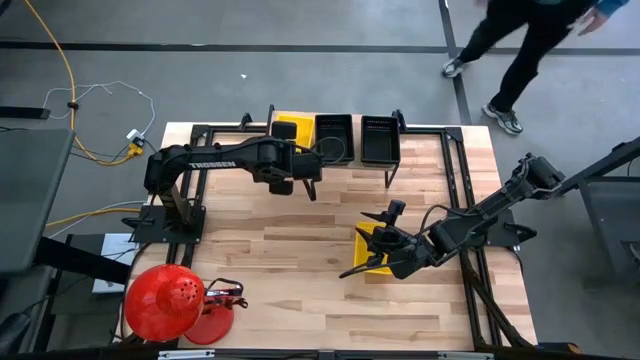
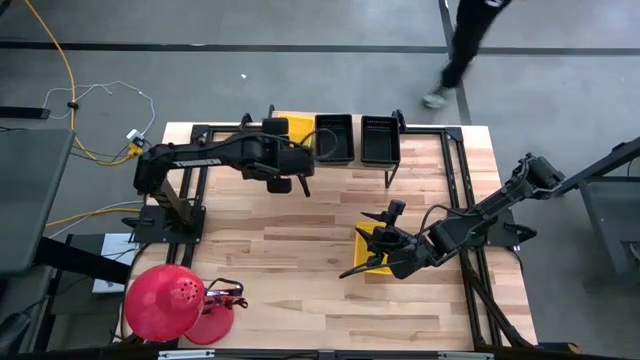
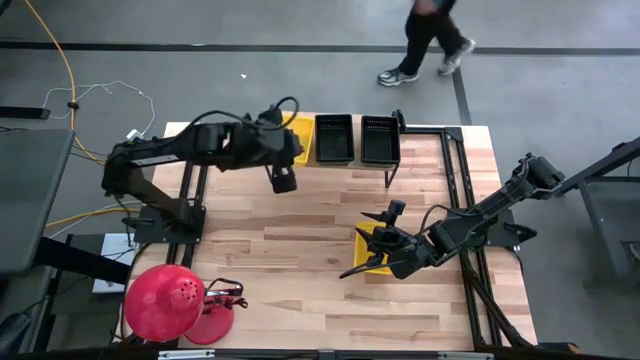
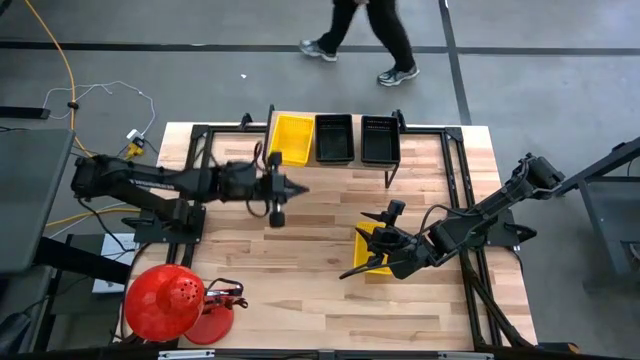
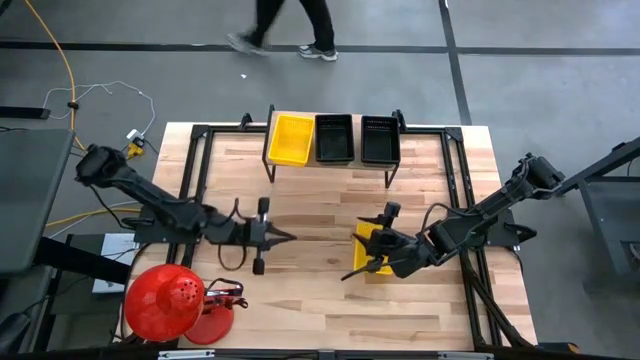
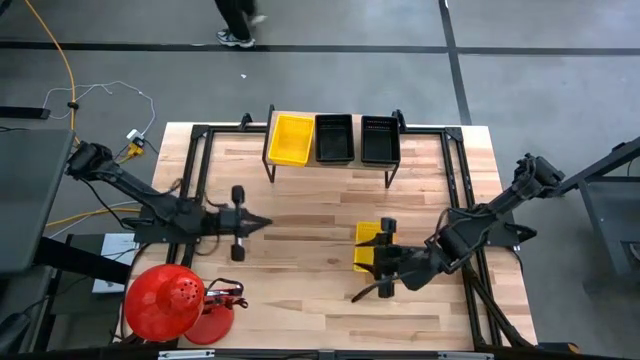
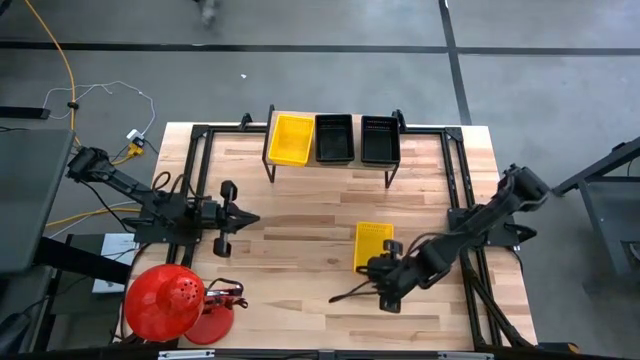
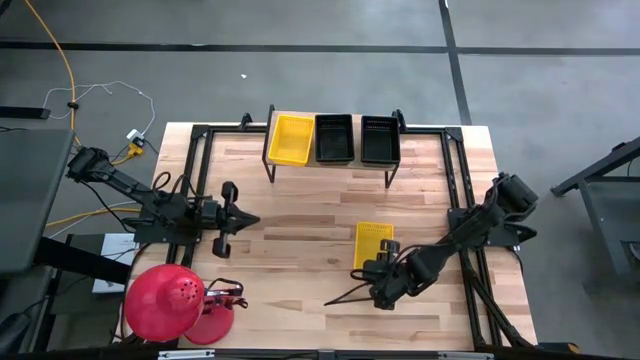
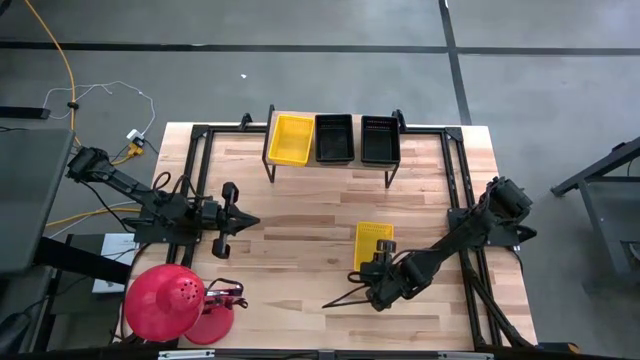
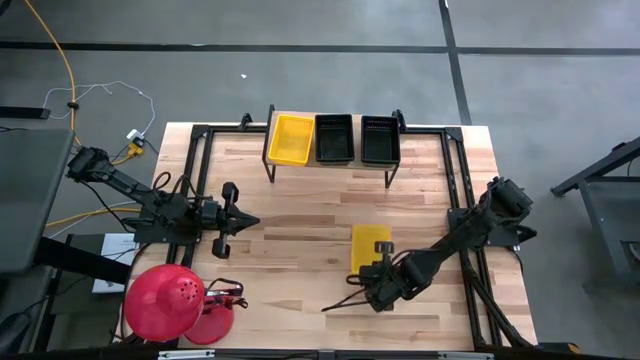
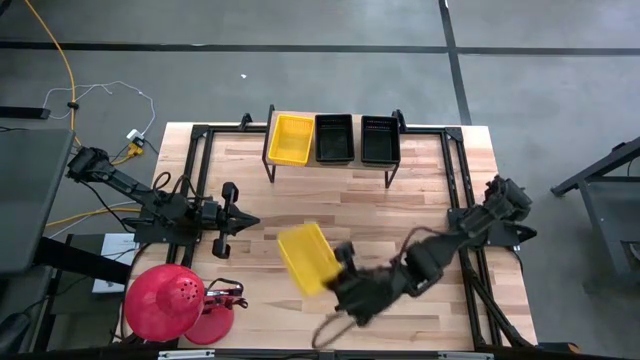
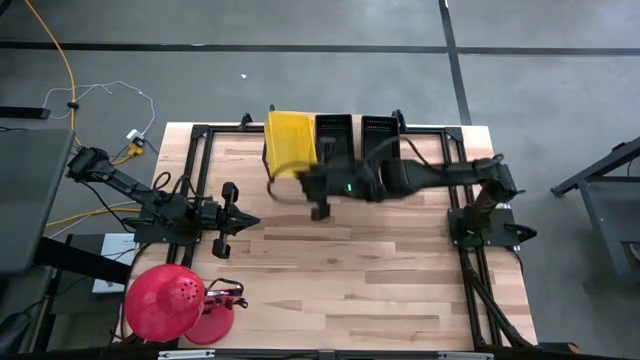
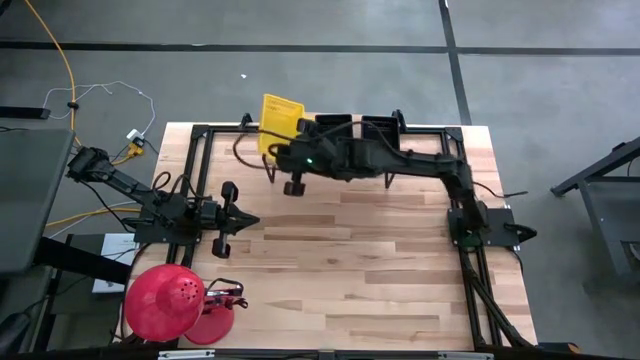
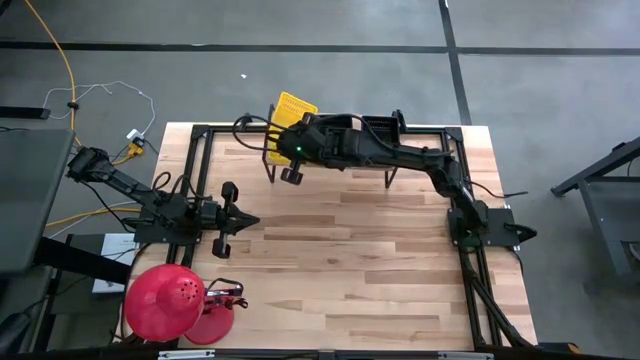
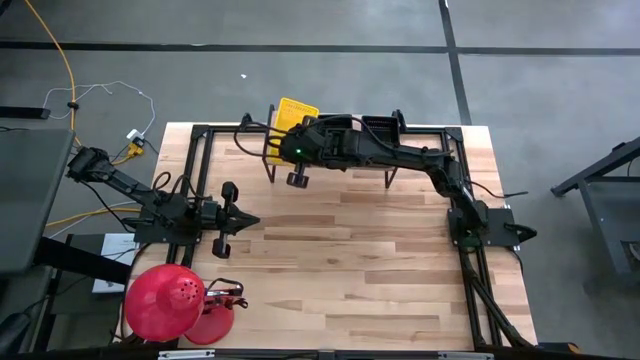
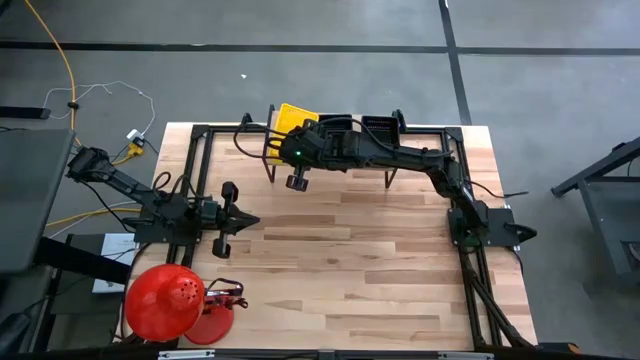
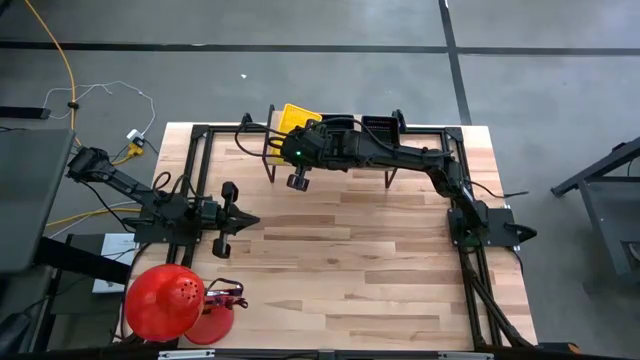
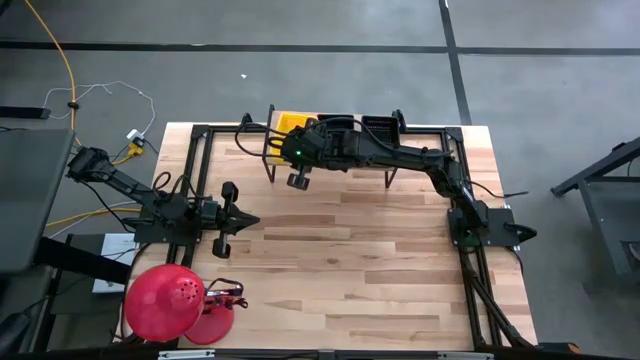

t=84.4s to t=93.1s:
Task: Stack baskets on shelf by color
Stack the yellow bin on the yellow bin on the shelf

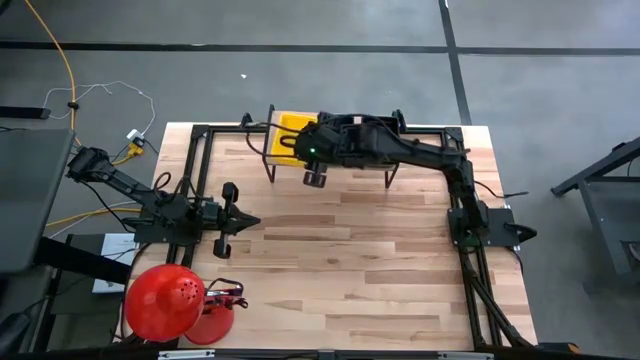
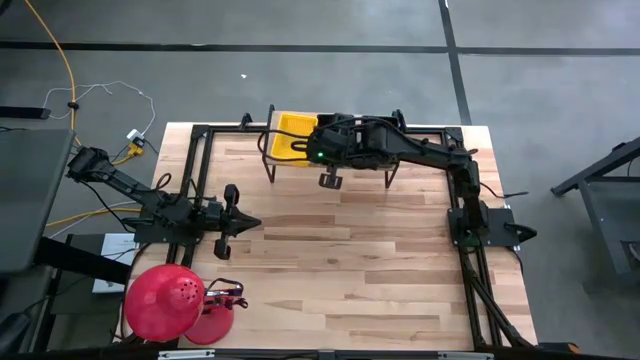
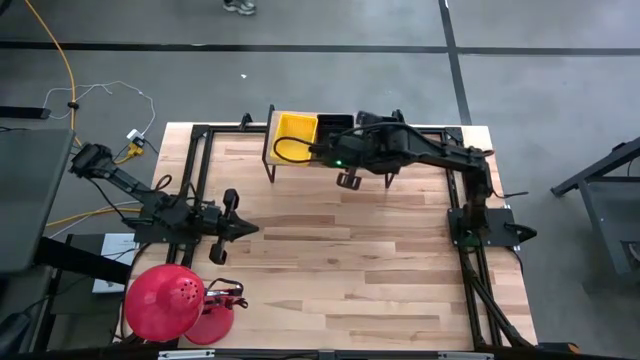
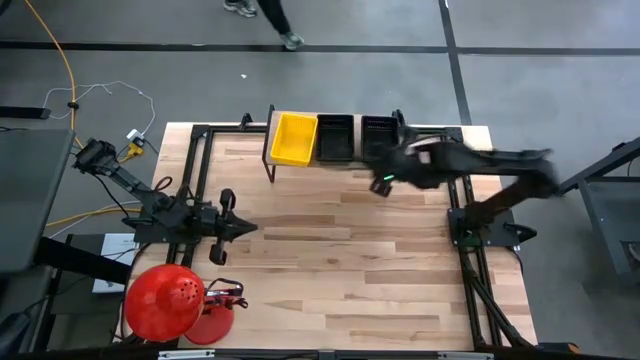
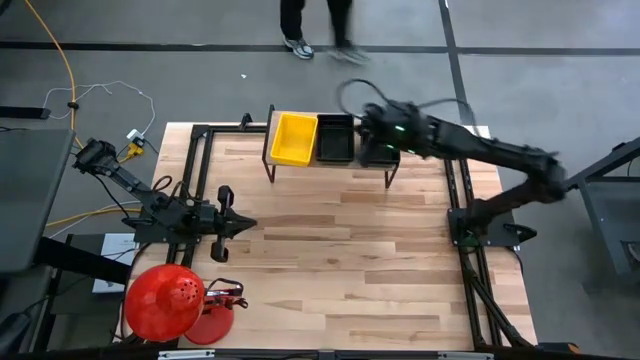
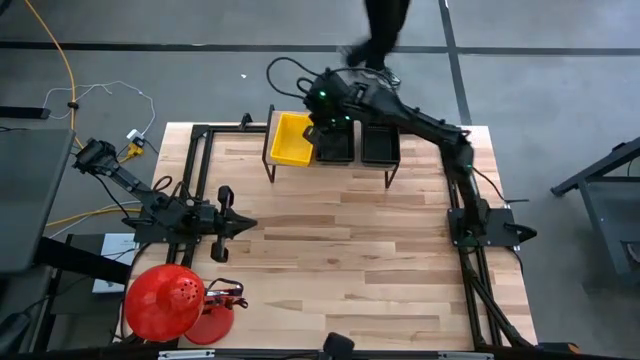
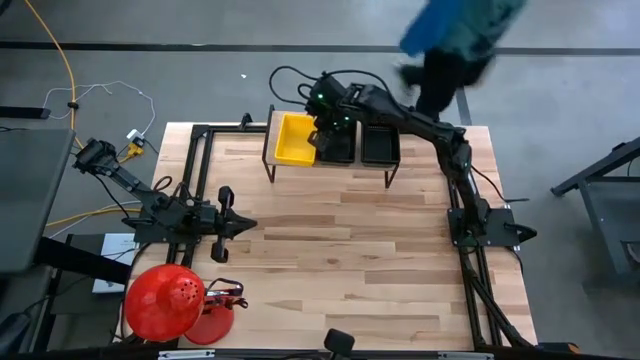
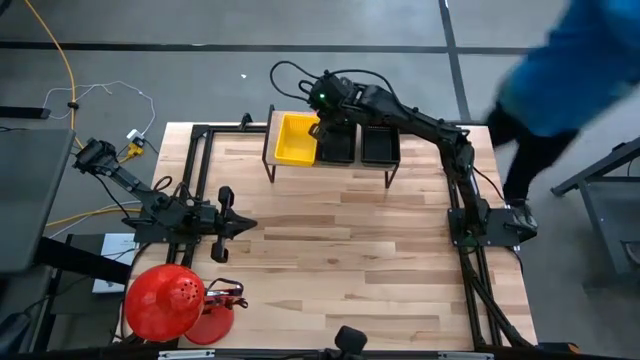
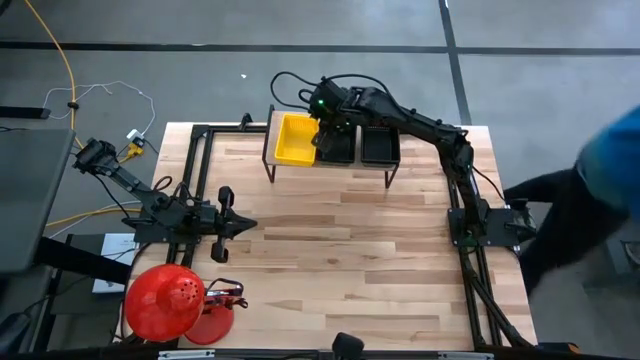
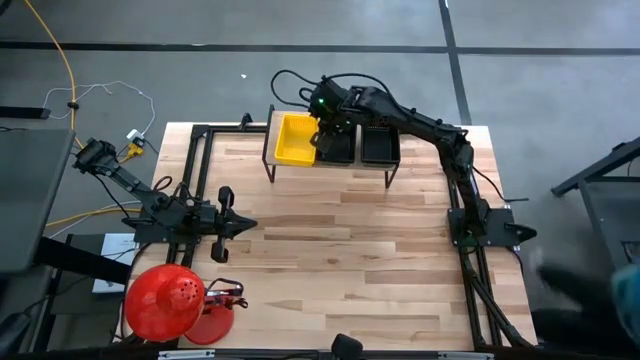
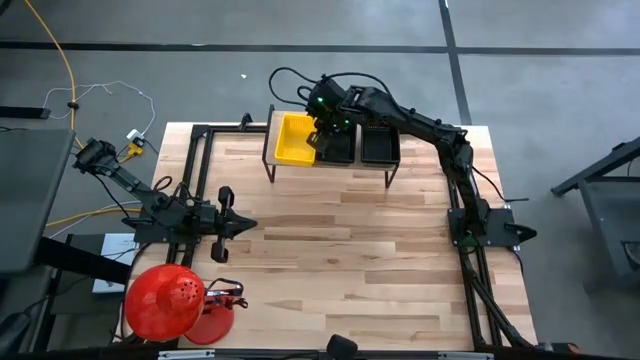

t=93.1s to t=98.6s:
Adjust the stack of bins on the shelf

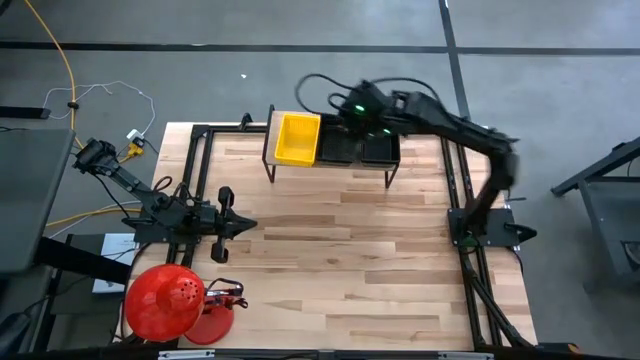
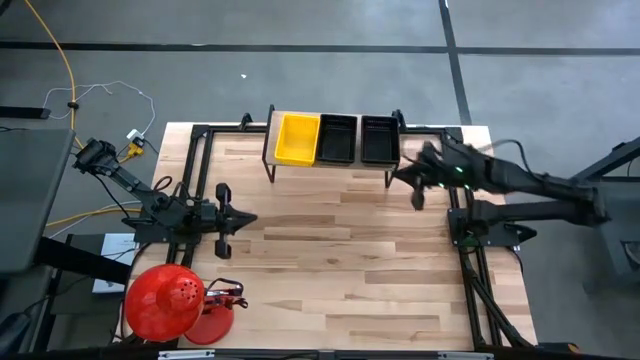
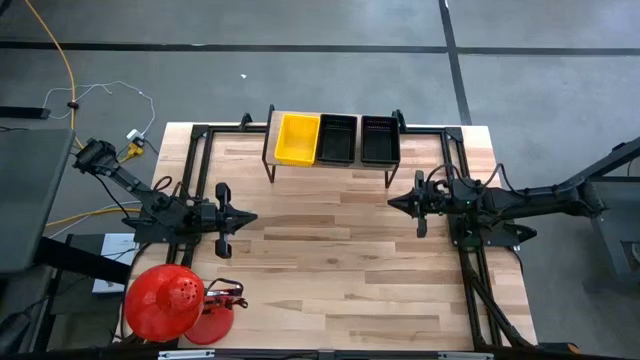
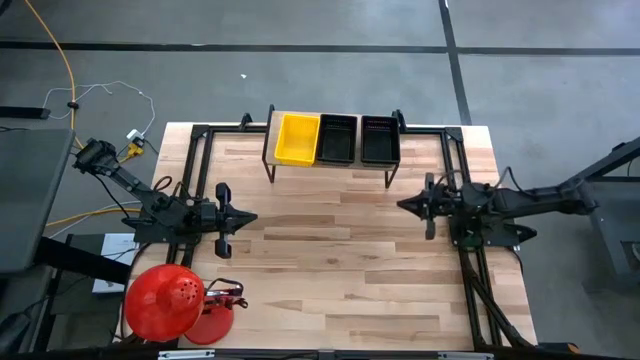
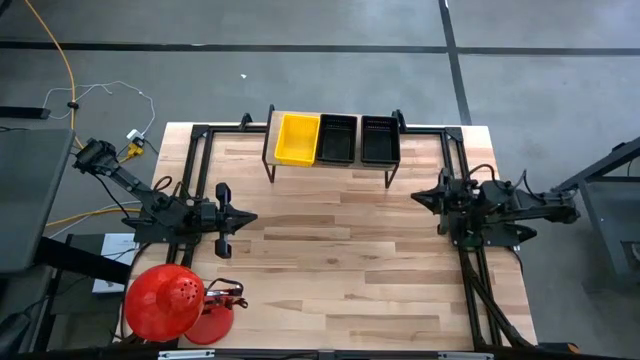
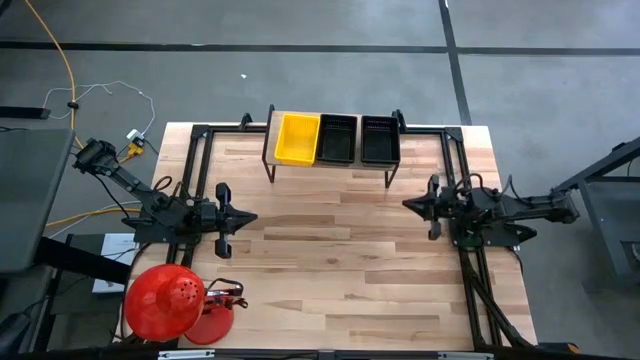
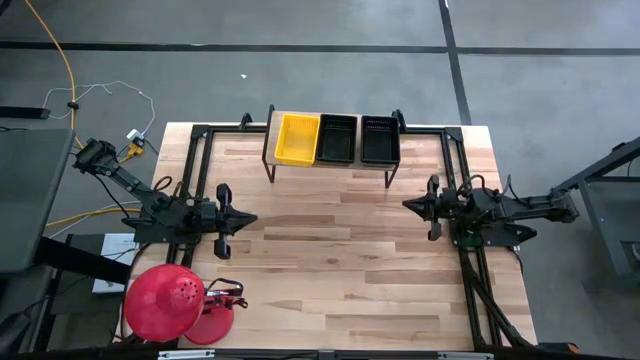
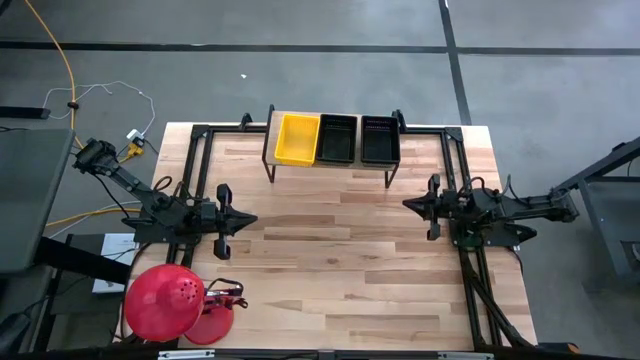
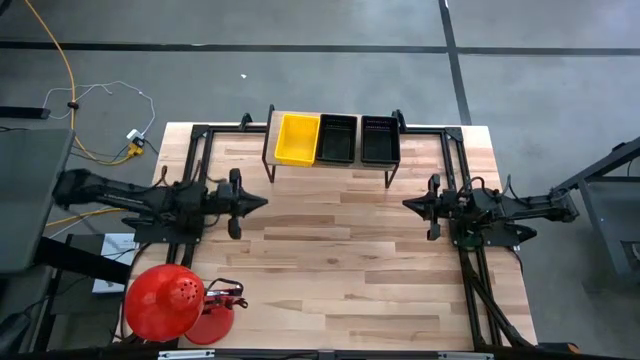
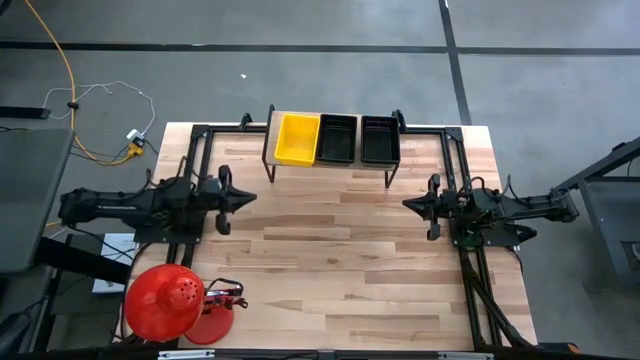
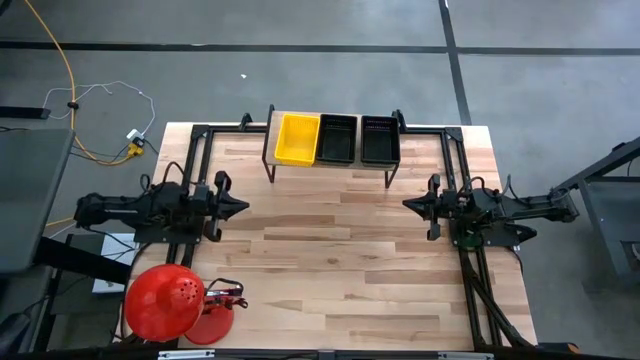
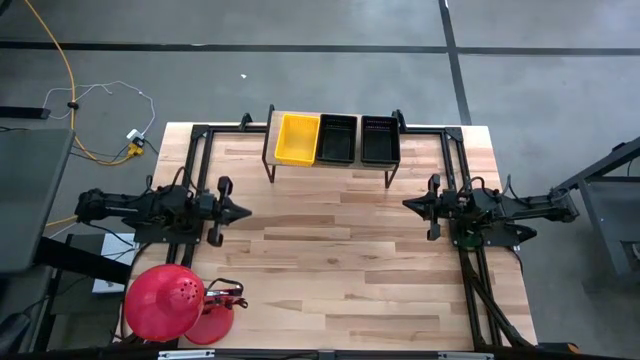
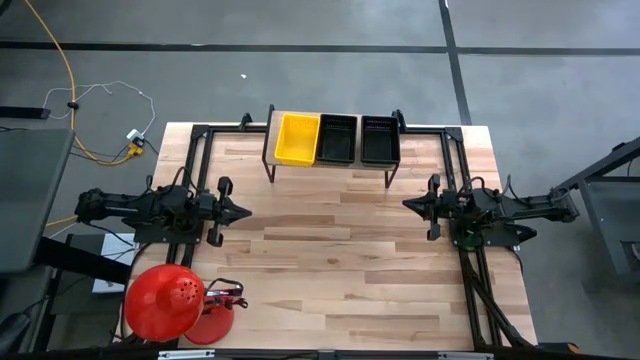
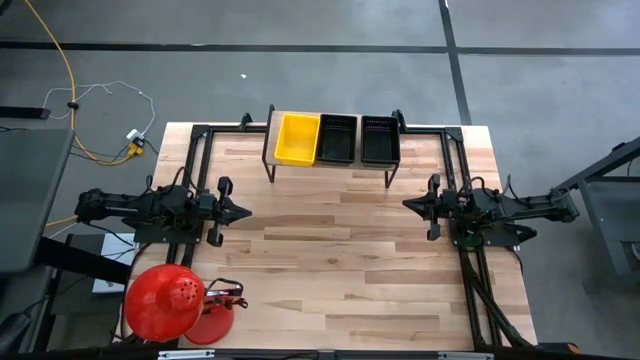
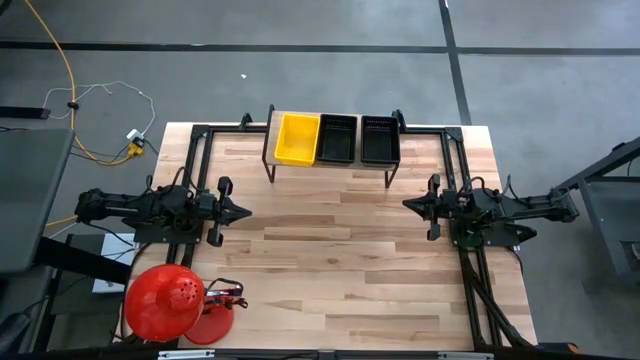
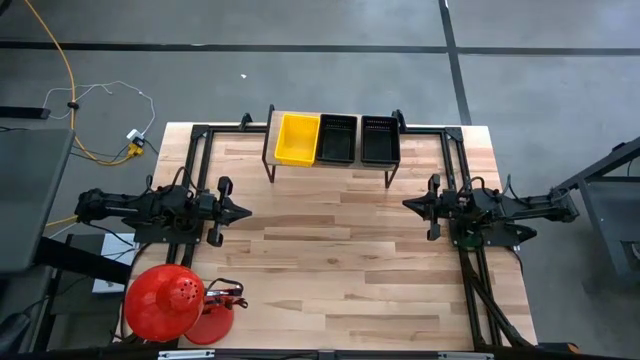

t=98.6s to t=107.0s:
Return to Home Position
